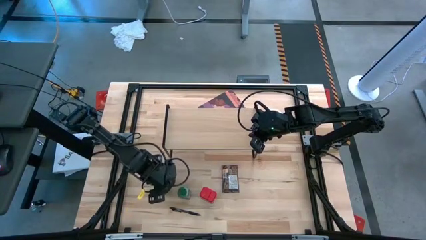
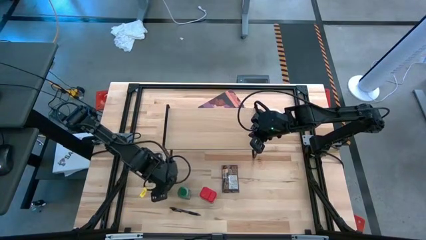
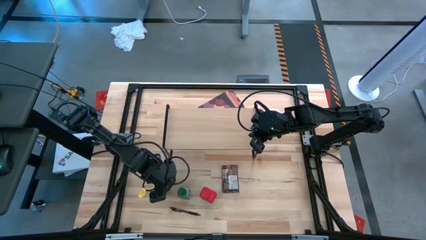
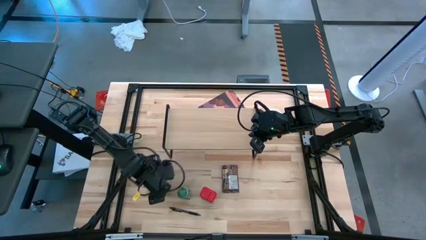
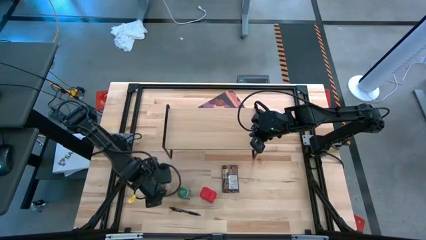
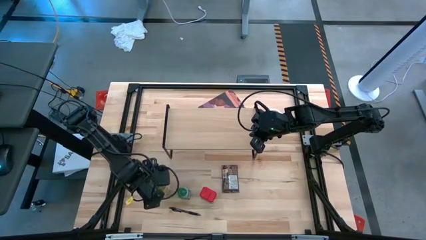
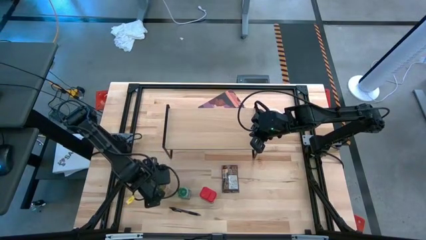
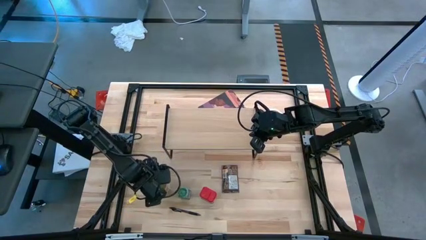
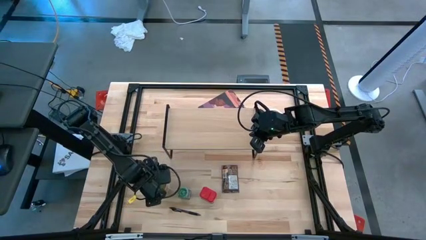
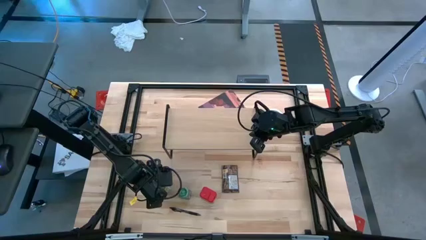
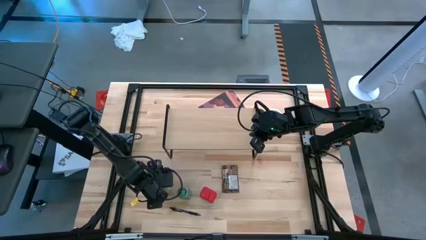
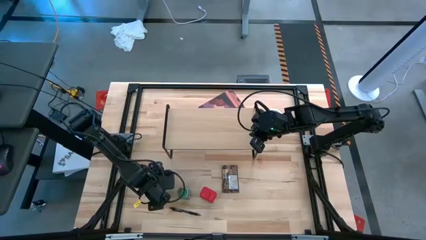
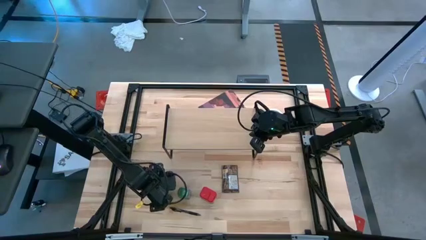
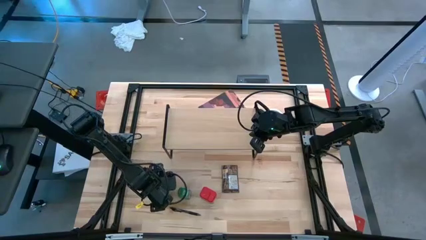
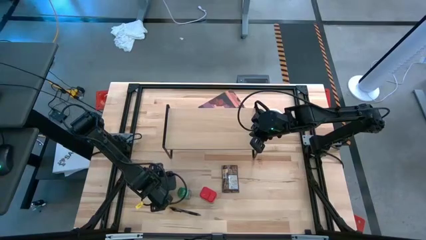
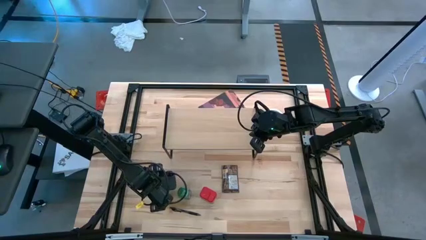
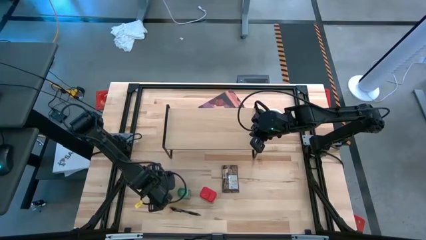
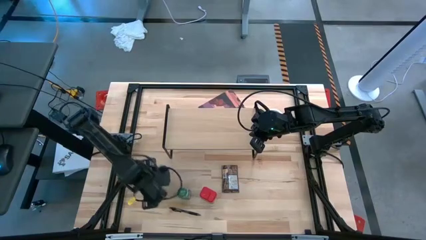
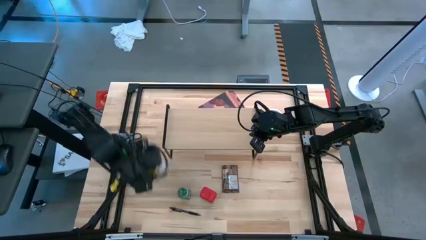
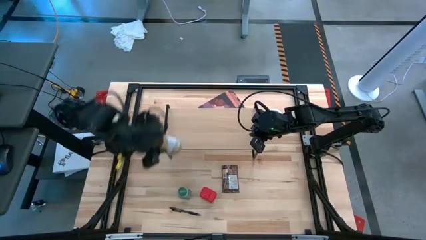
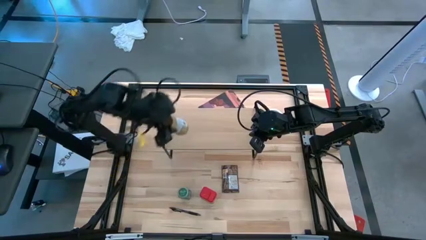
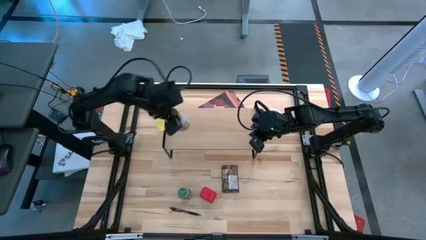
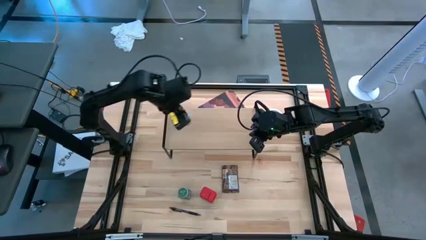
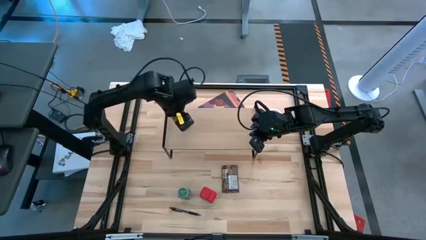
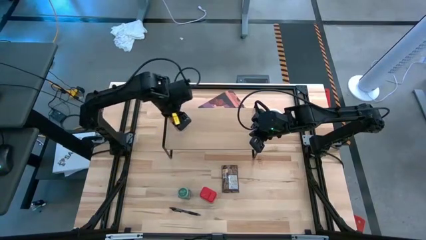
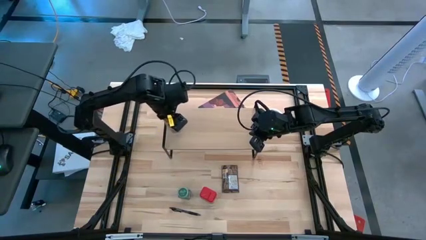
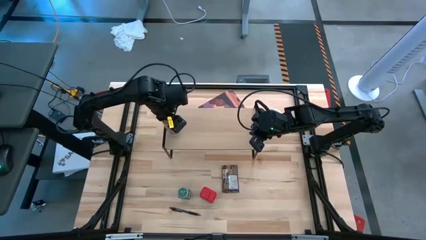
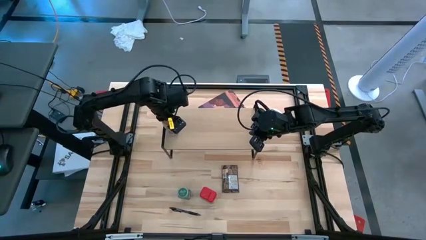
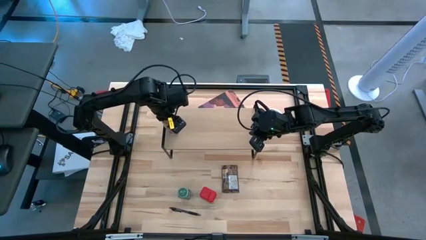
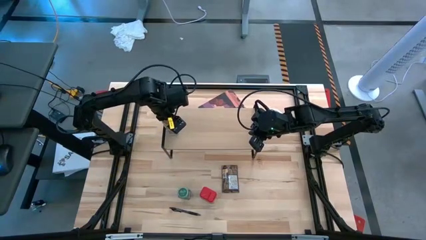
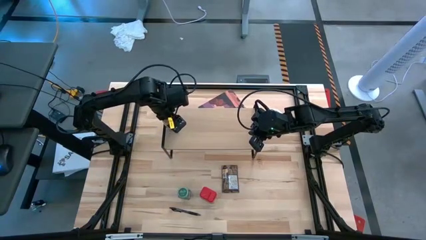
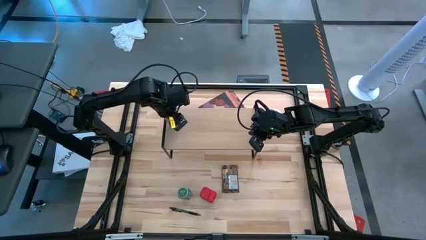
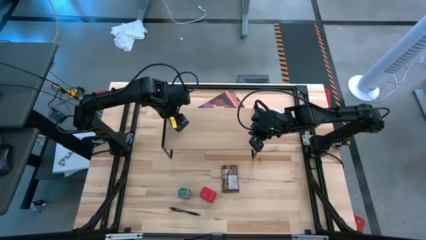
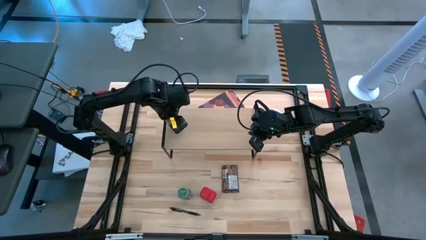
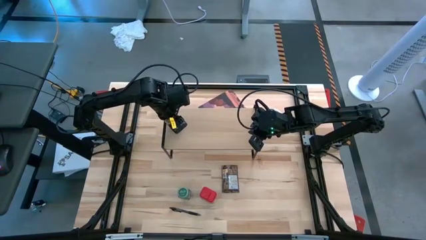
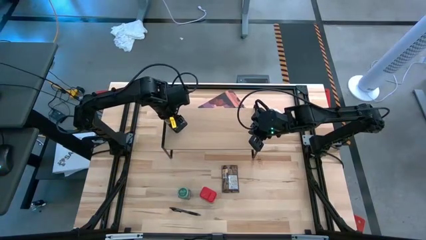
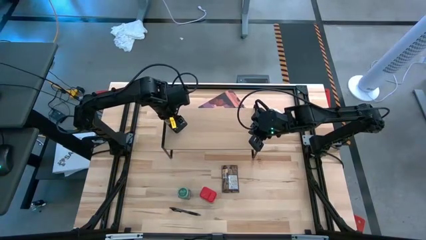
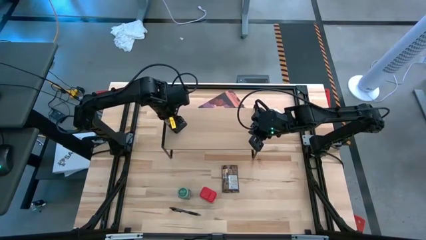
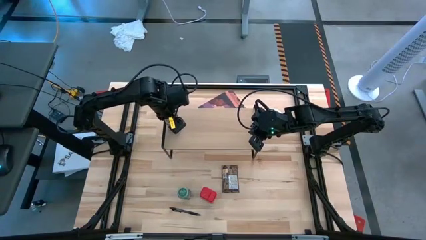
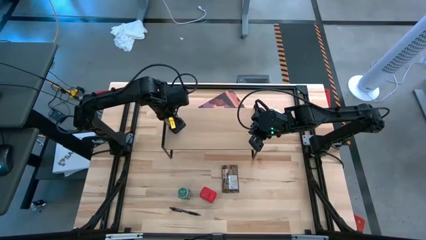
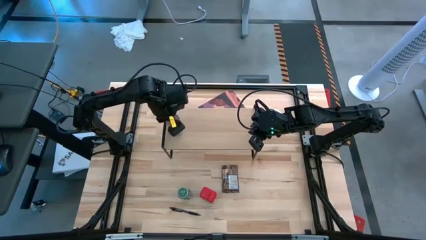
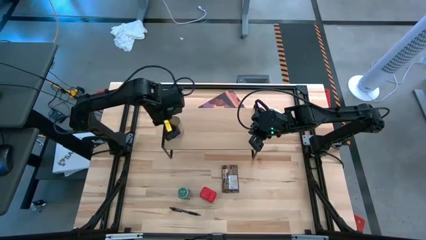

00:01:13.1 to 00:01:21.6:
Task: Shelf spices
Put the brown seasoning bottle on the shelf

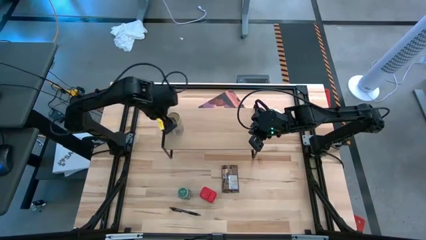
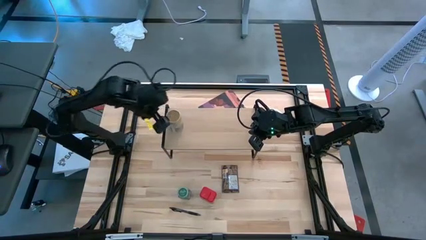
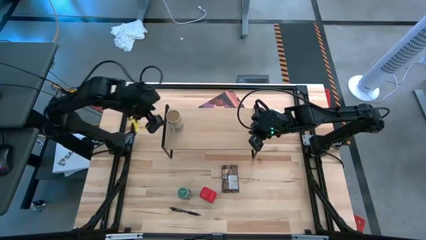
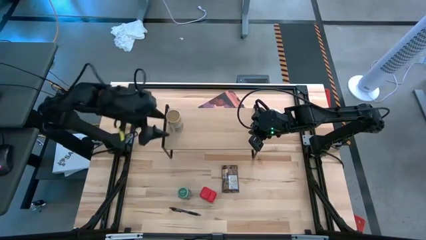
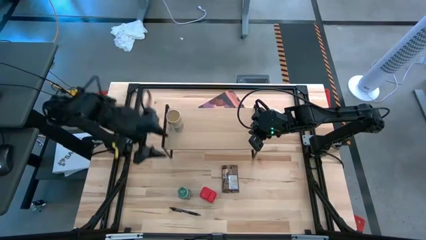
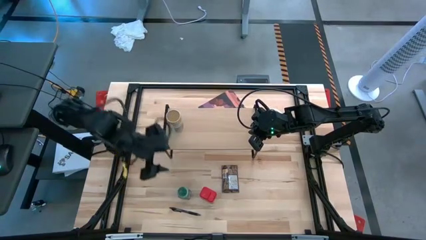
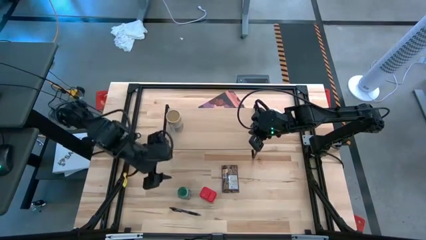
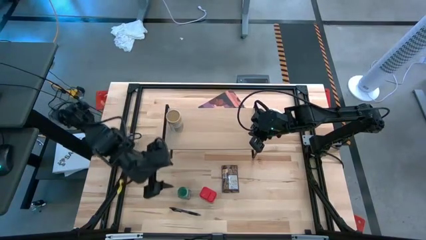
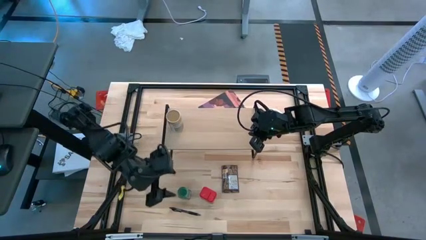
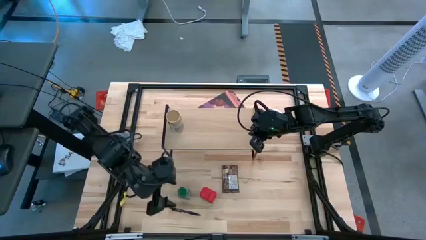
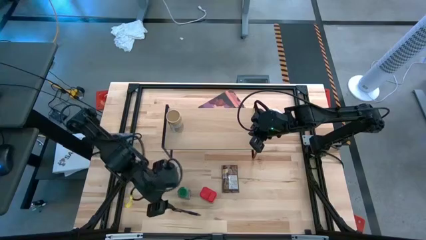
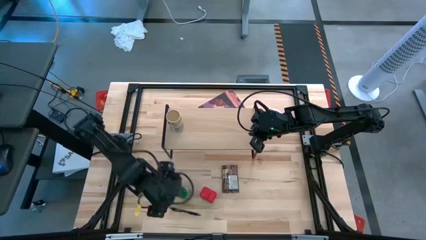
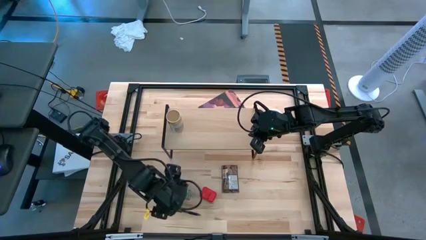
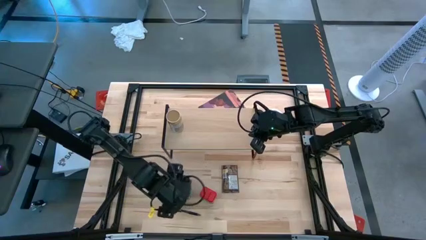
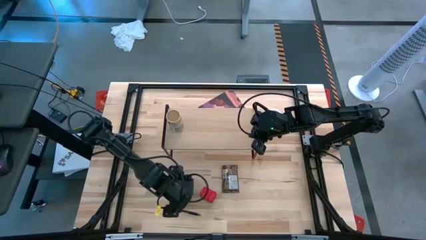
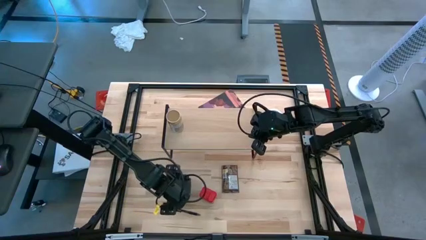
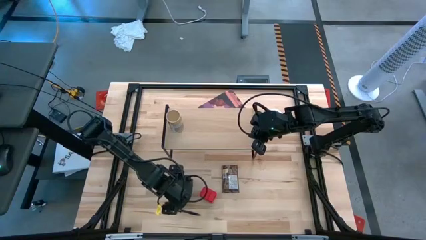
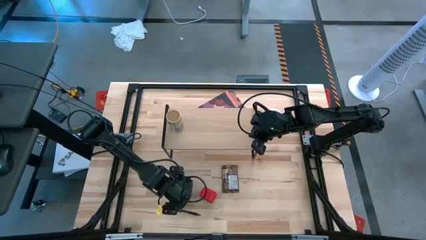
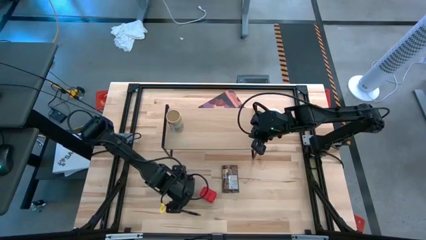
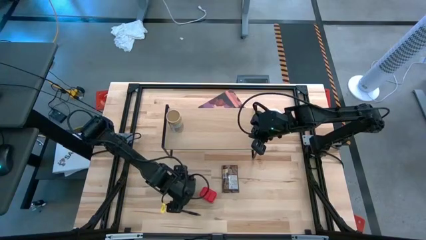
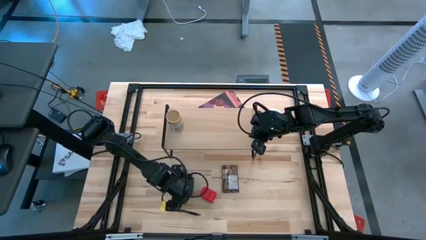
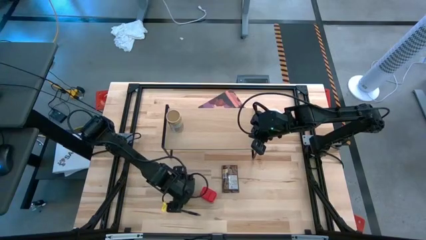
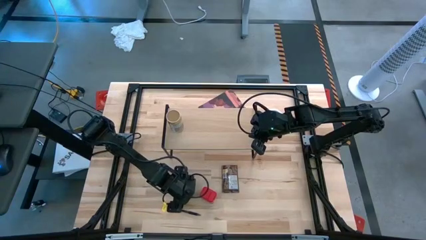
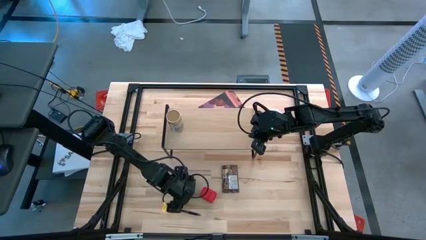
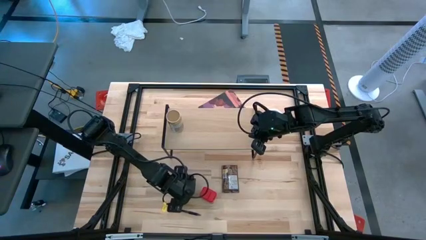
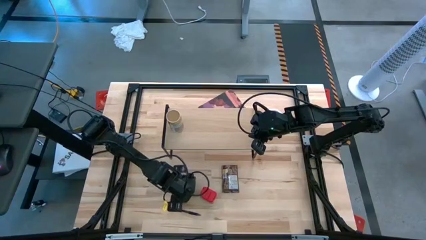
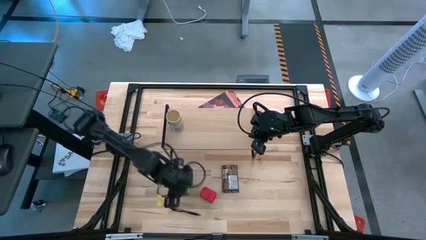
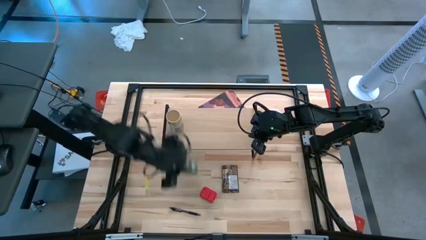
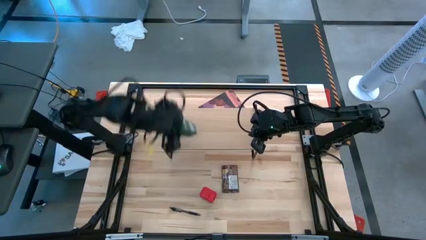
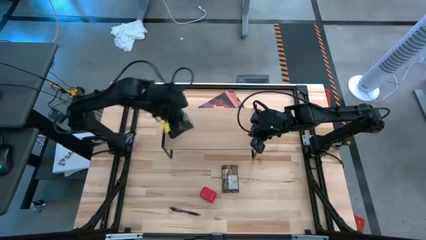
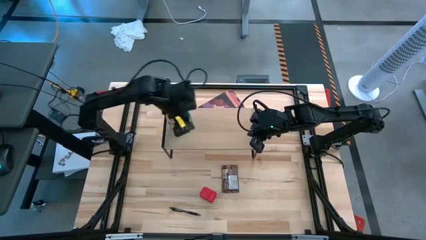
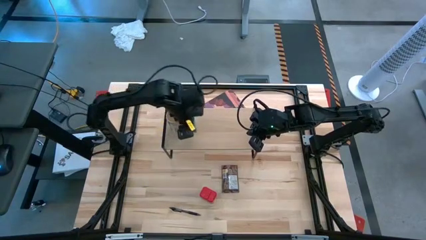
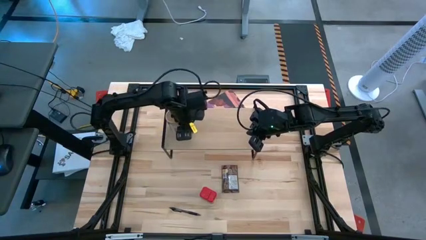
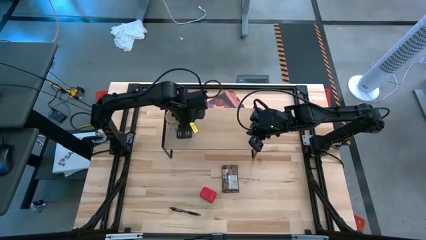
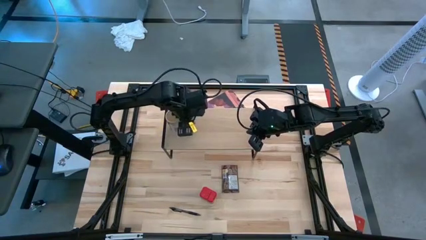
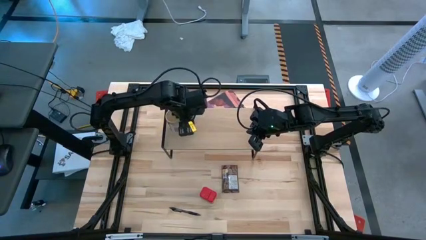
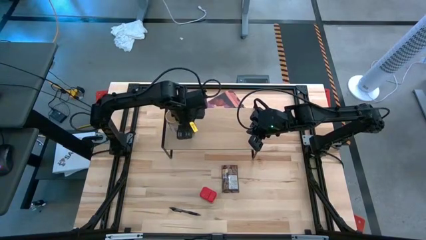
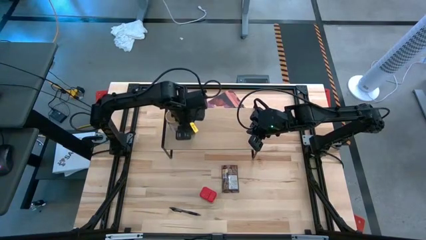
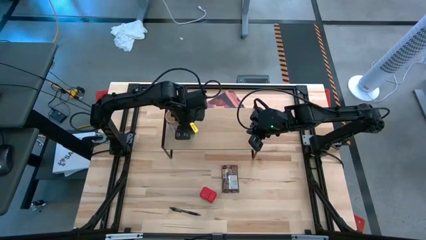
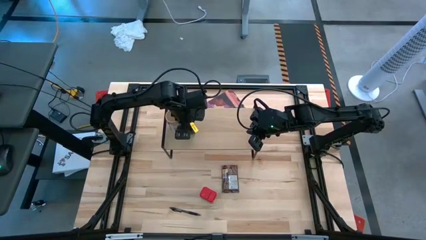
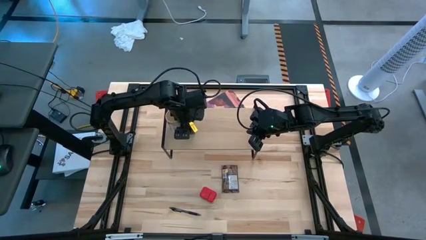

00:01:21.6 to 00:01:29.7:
Put the green seasoning bottle on the shelf

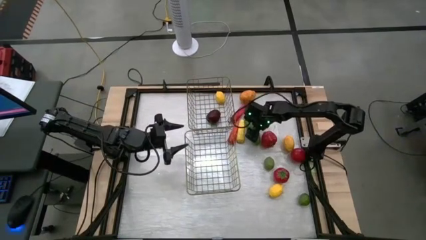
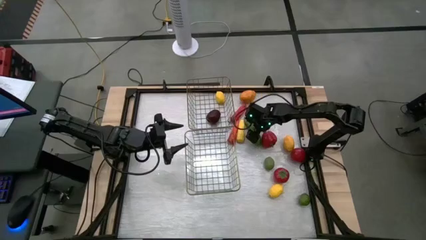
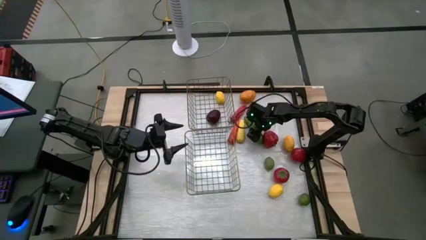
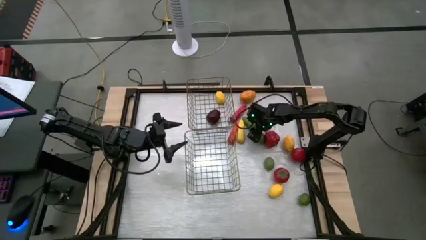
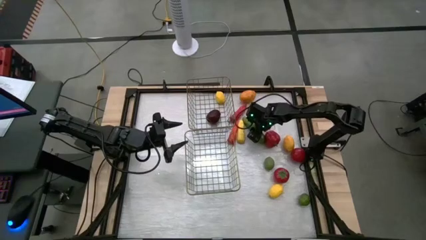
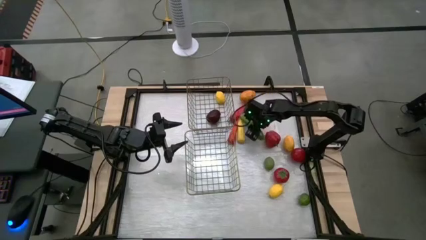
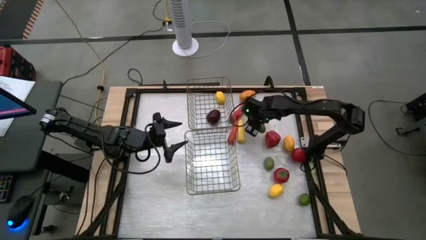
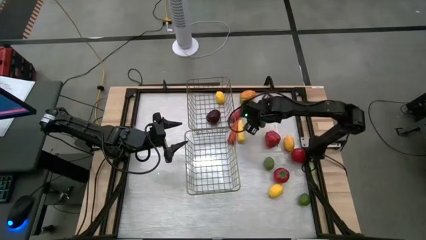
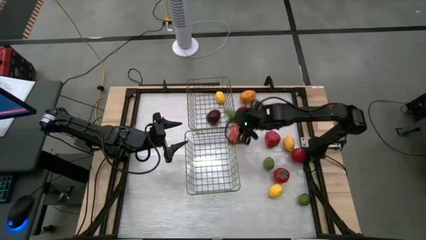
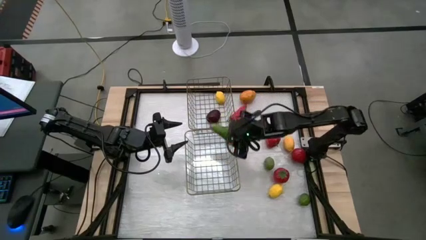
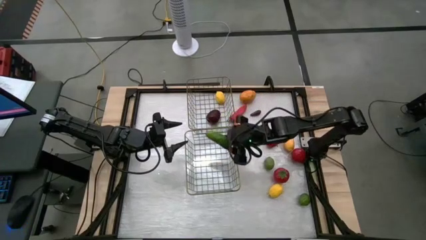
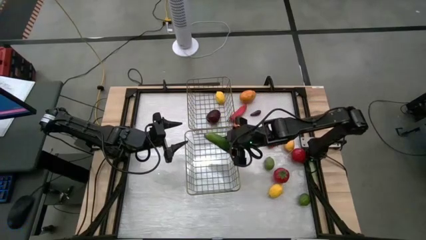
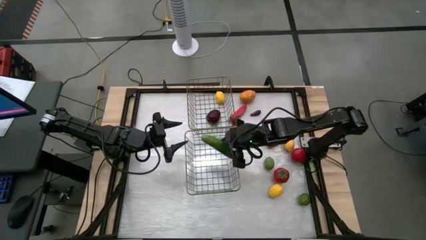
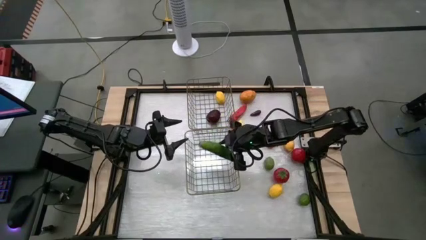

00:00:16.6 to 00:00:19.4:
Task: Sort produce into baskets
Put the green cucumber into the bottom wire basket
